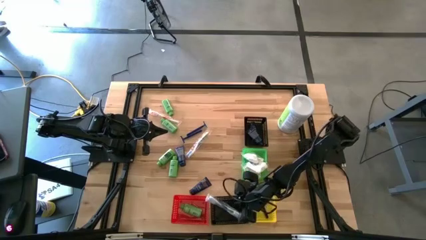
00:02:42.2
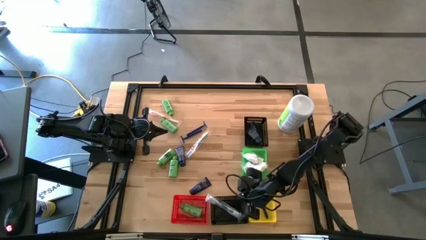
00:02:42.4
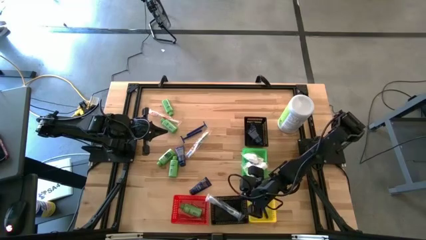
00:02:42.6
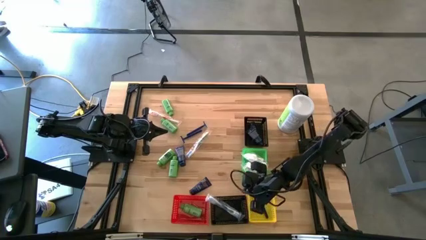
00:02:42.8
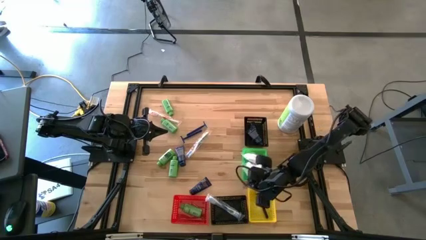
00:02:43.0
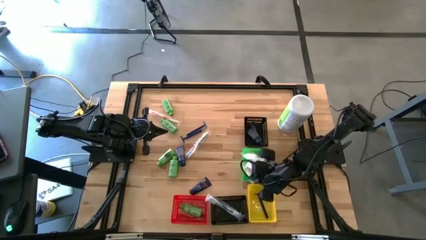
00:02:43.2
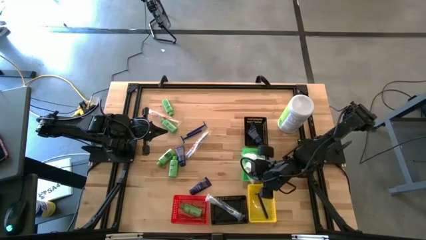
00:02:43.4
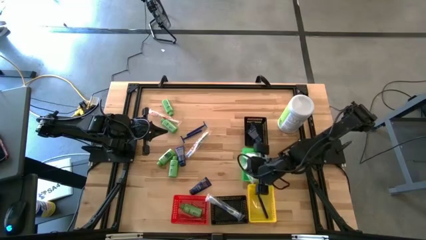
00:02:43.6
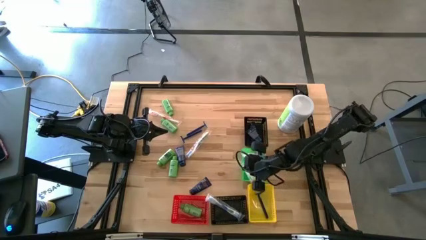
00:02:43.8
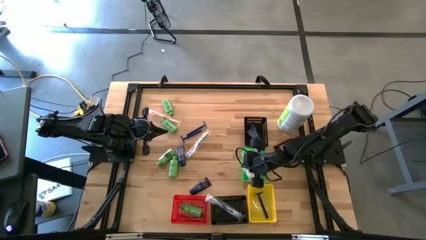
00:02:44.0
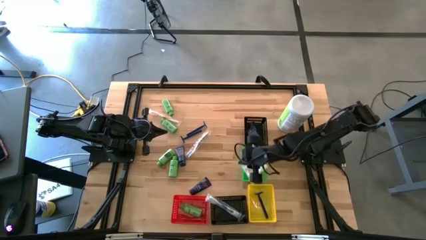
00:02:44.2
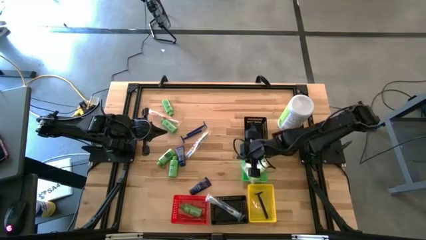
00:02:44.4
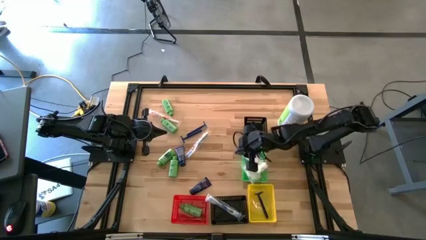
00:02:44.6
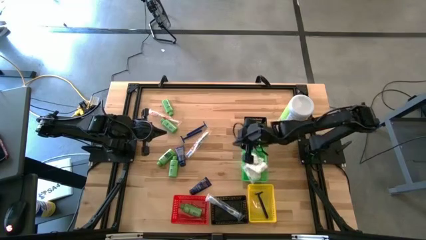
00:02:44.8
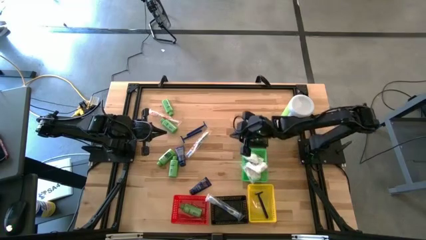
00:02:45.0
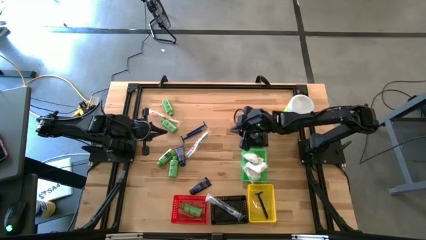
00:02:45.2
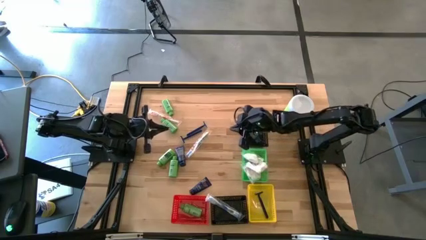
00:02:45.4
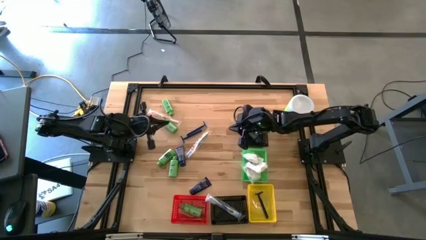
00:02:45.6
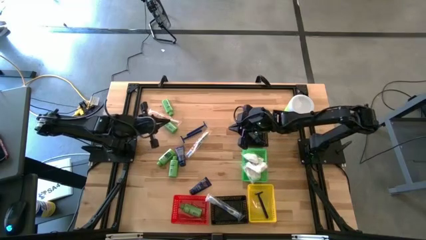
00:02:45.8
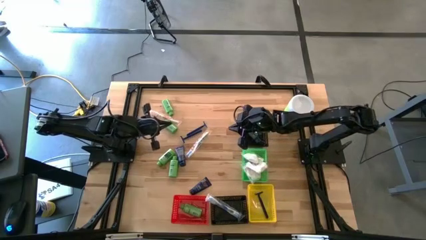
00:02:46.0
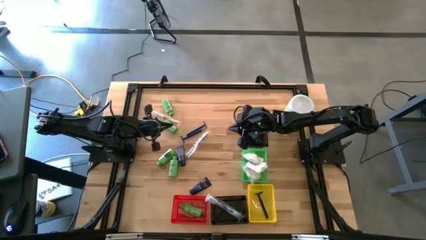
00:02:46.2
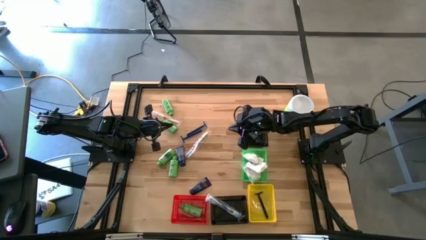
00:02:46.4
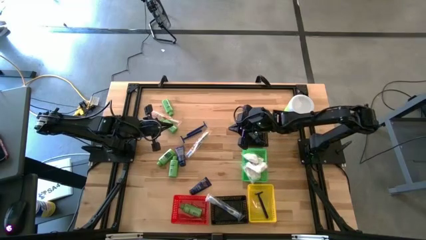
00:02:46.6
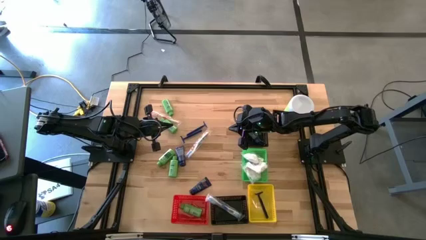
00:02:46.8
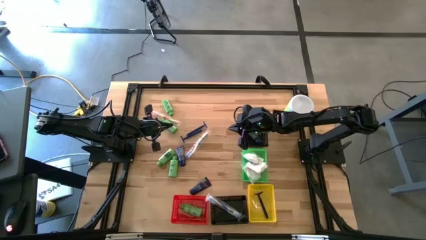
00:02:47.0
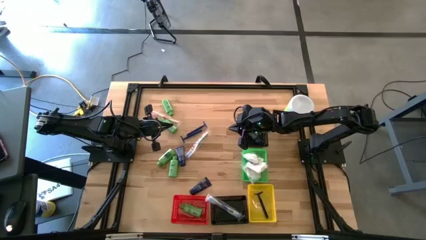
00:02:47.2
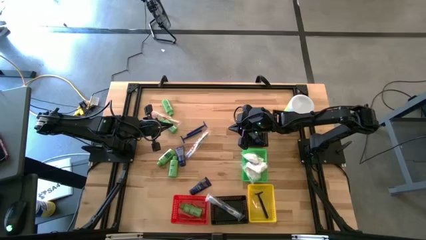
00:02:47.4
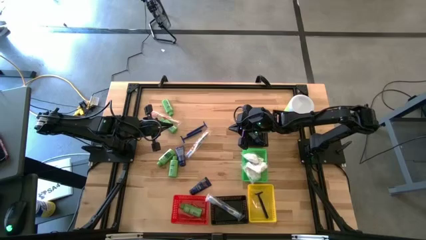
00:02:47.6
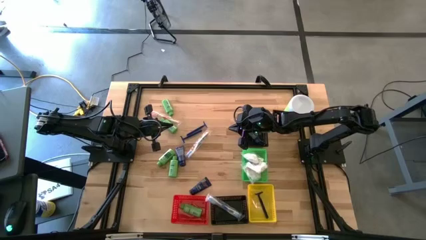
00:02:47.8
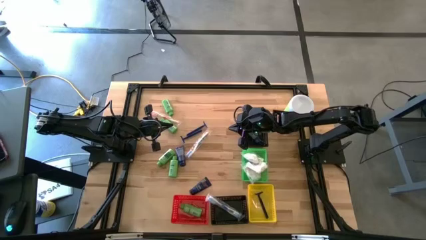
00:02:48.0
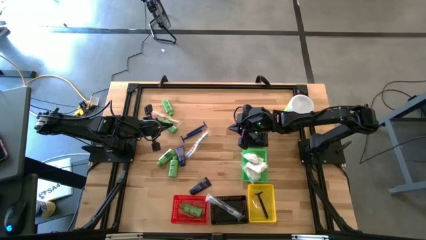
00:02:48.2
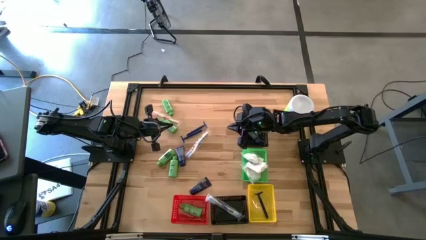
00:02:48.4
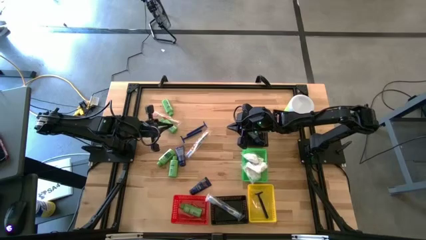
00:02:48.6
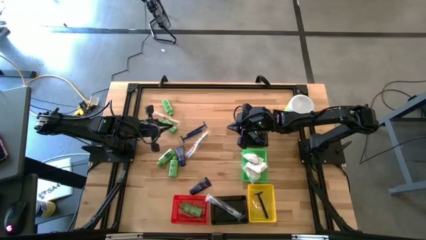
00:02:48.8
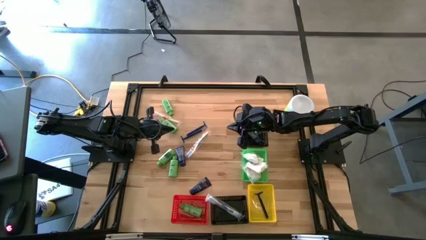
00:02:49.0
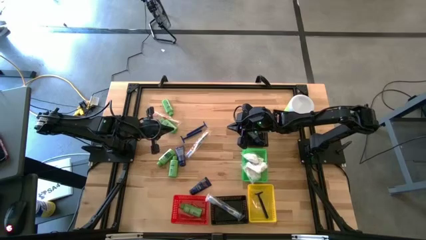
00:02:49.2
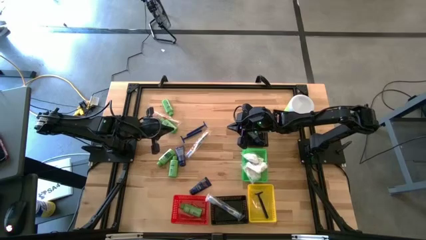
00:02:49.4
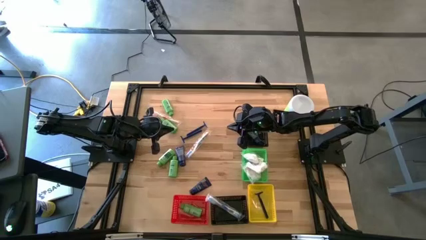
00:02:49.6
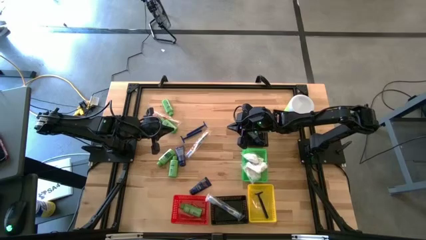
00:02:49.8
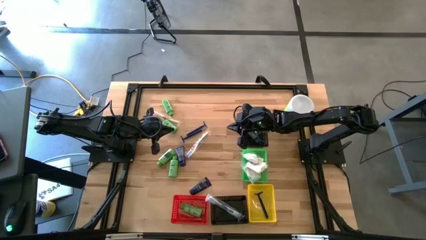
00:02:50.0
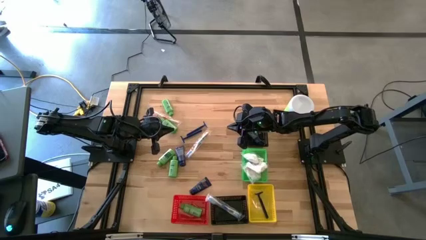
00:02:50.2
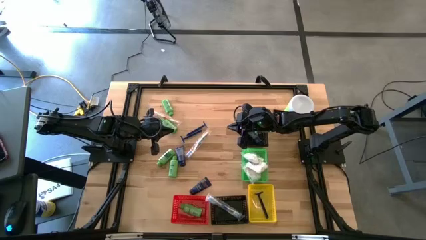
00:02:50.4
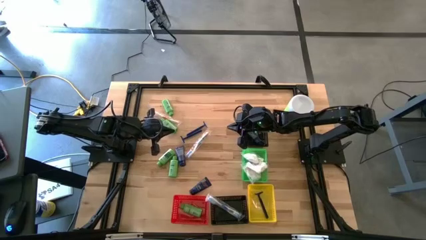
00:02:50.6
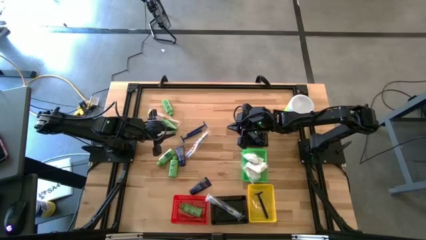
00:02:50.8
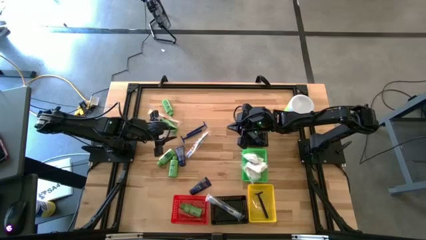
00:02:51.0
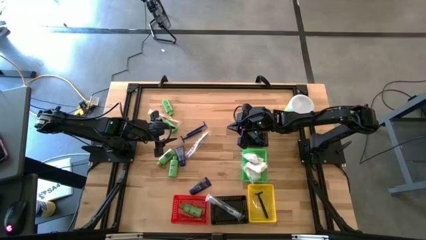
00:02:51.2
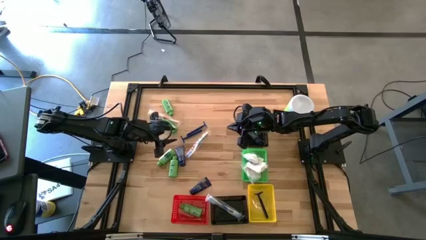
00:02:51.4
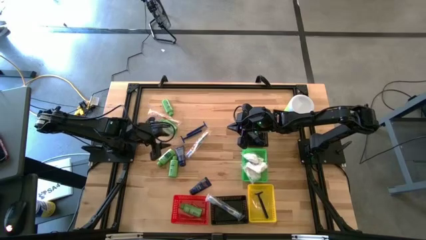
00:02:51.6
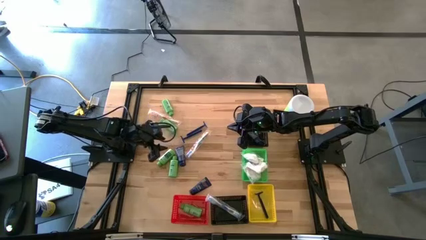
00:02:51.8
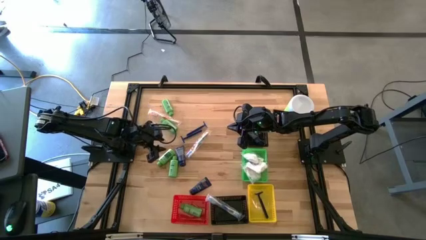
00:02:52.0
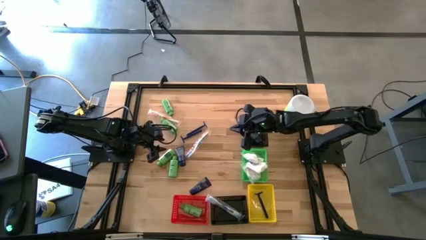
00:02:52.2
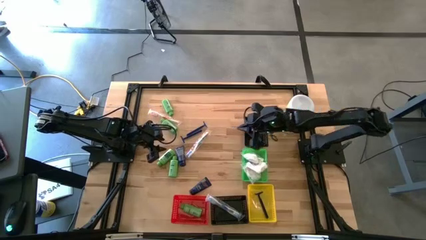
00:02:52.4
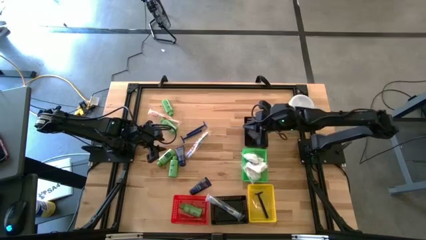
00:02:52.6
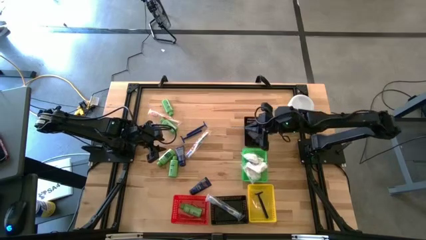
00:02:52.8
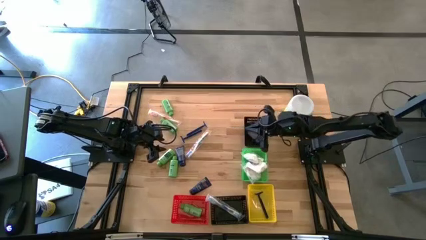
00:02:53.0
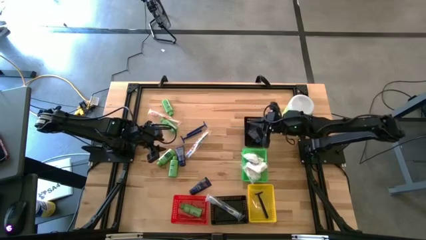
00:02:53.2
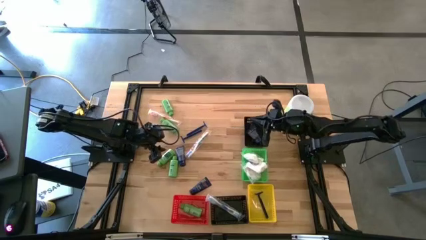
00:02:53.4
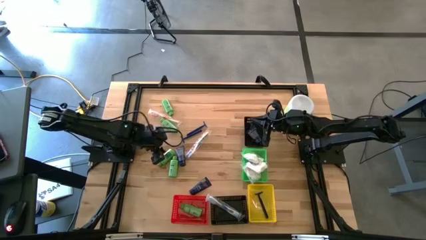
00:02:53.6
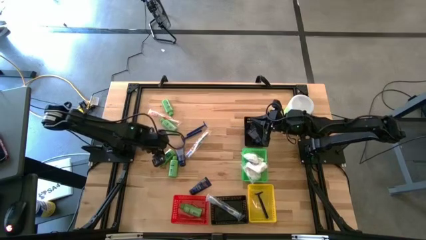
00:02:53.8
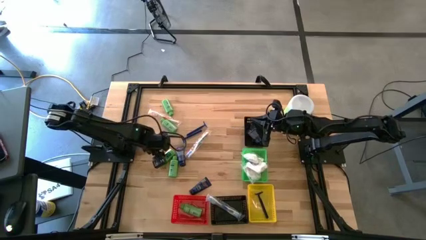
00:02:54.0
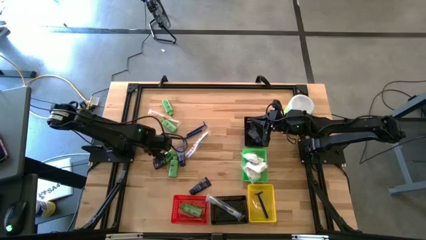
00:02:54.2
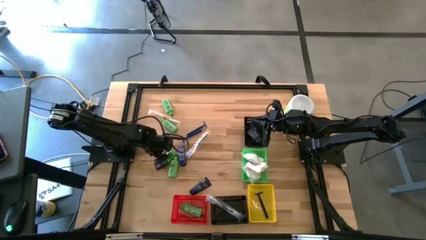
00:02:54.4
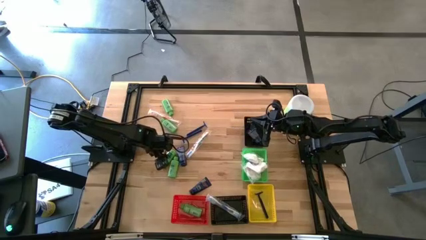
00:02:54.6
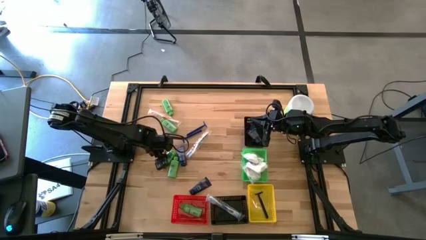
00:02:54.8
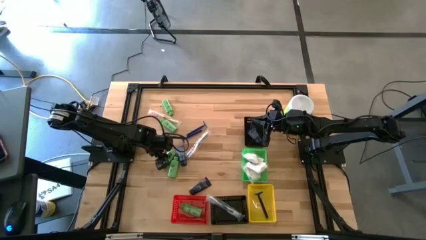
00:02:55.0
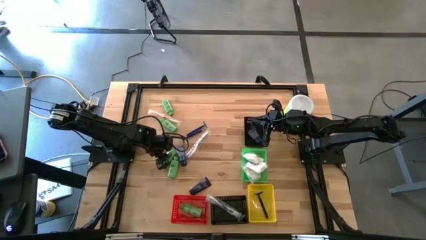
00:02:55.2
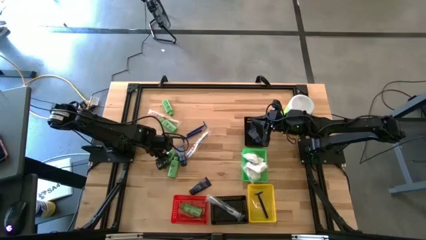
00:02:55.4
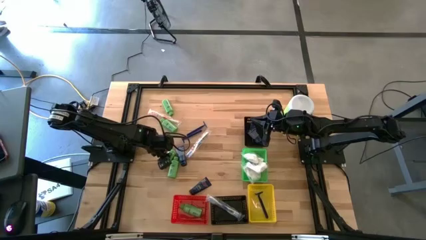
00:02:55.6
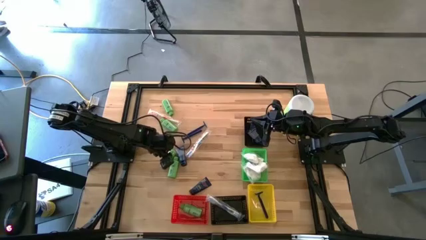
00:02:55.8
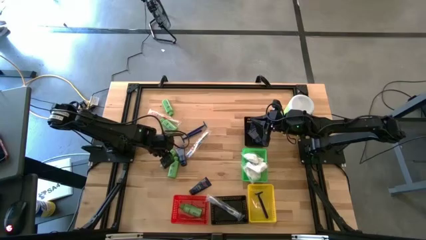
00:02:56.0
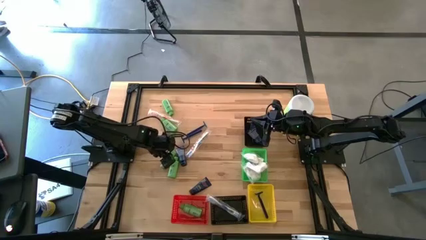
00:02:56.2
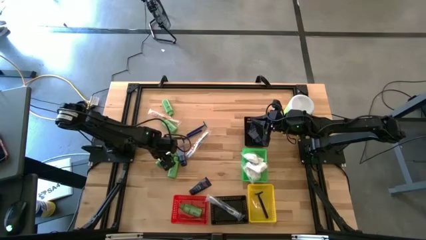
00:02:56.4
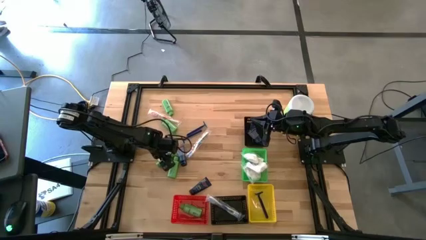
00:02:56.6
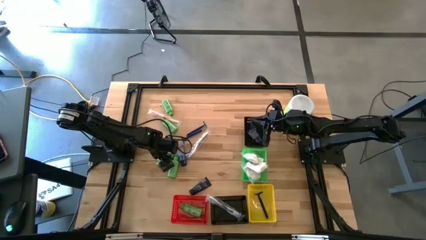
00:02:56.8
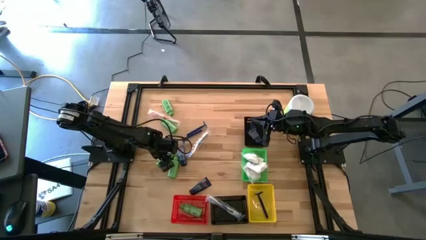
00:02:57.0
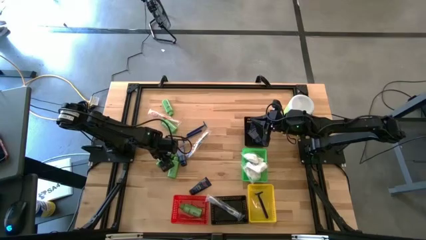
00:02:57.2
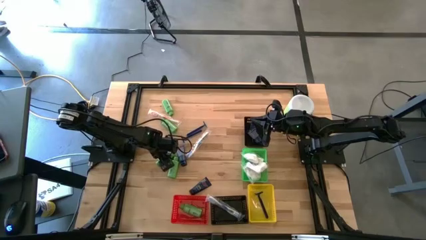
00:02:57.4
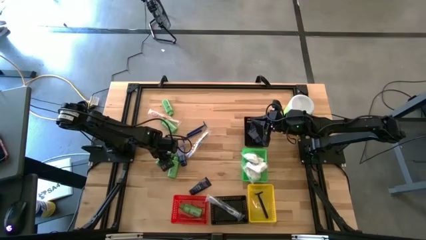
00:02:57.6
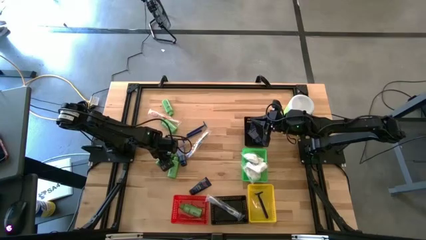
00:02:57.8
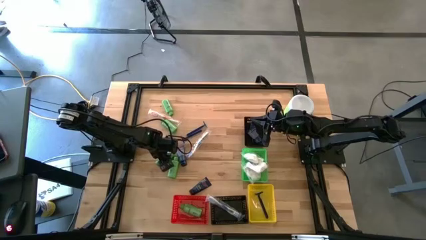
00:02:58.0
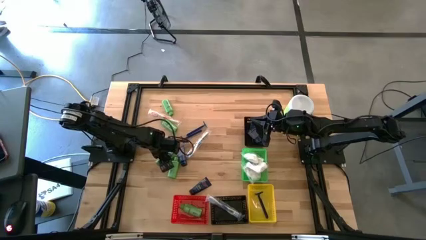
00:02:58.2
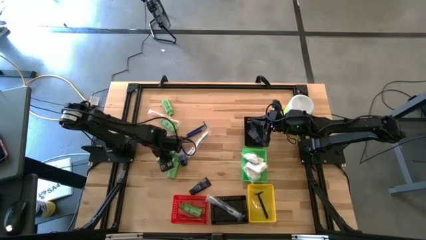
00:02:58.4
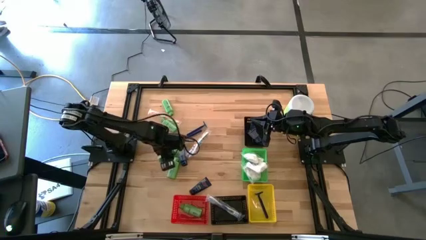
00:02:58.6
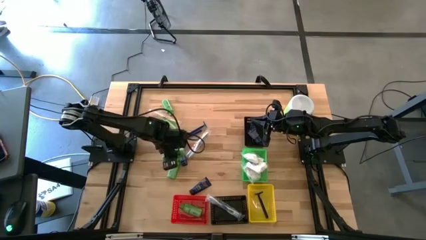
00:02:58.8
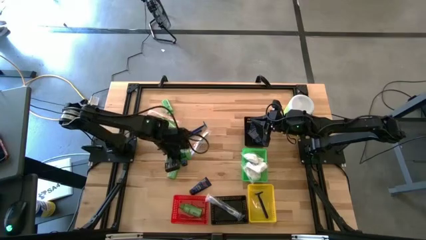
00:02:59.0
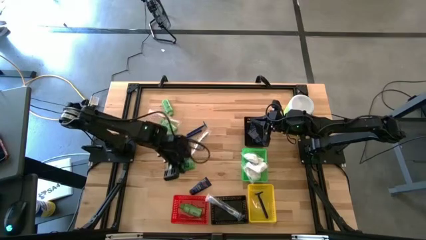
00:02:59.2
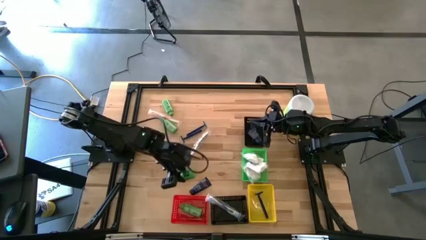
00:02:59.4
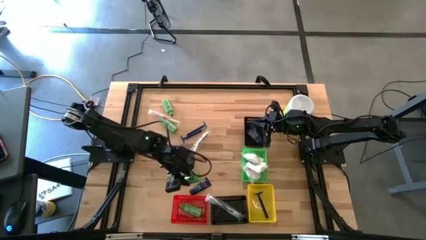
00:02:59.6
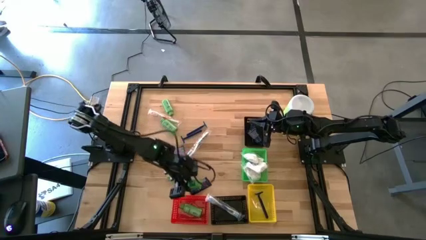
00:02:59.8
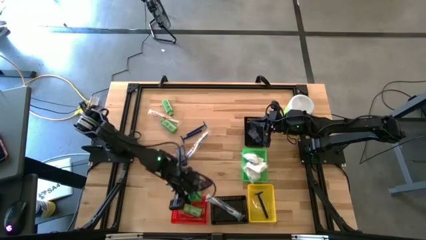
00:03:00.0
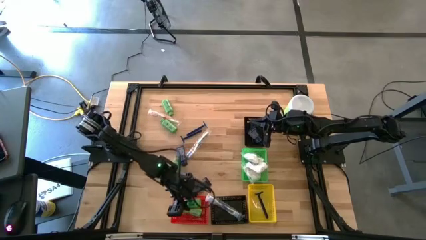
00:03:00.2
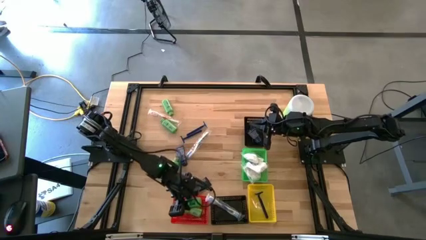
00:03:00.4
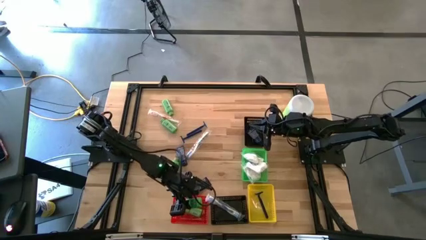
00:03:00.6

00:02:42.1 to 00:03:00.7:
Task: Pick & Place Travel size toiletries
Put the green shampoo bottle into the red bin
